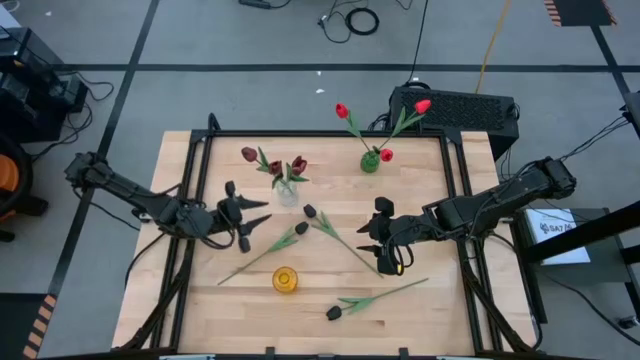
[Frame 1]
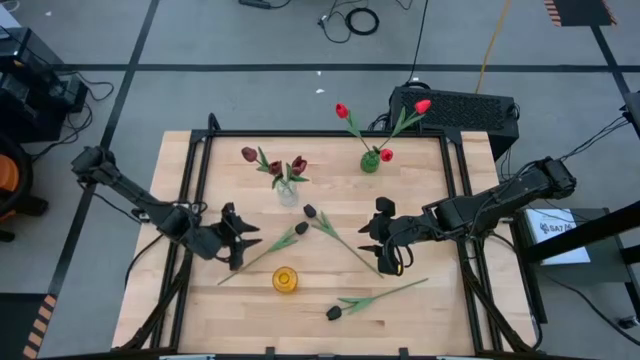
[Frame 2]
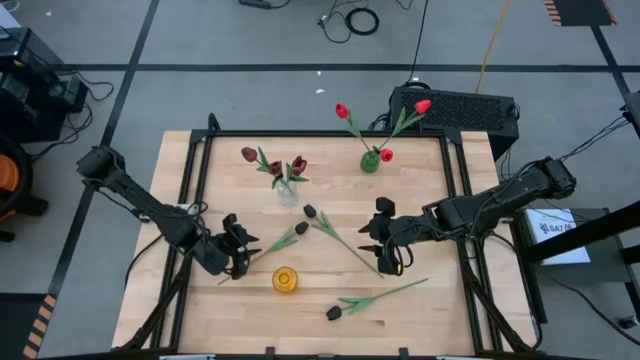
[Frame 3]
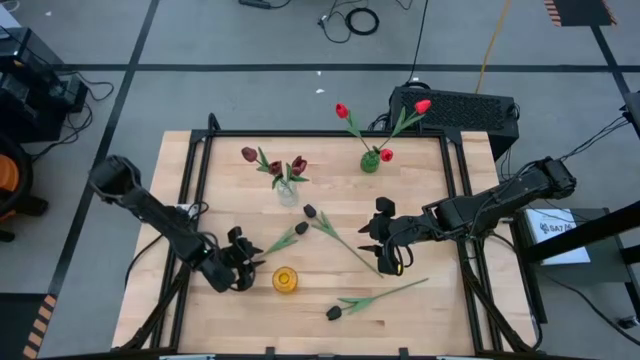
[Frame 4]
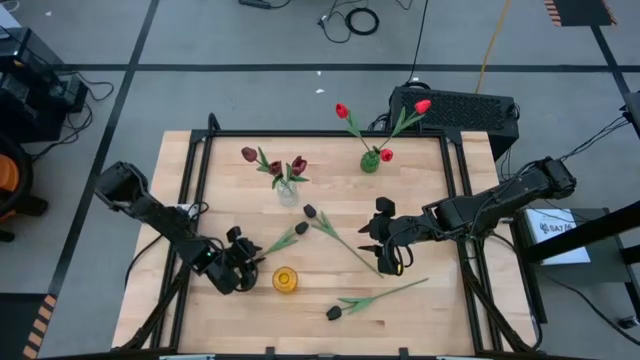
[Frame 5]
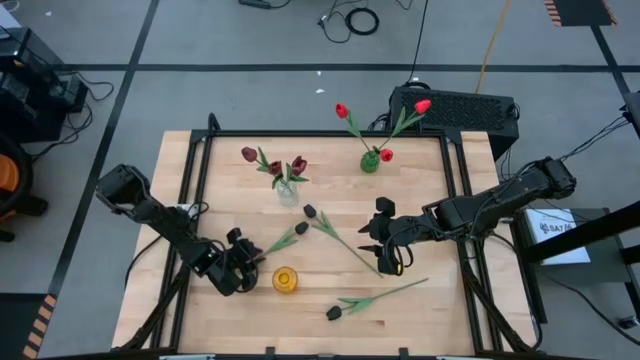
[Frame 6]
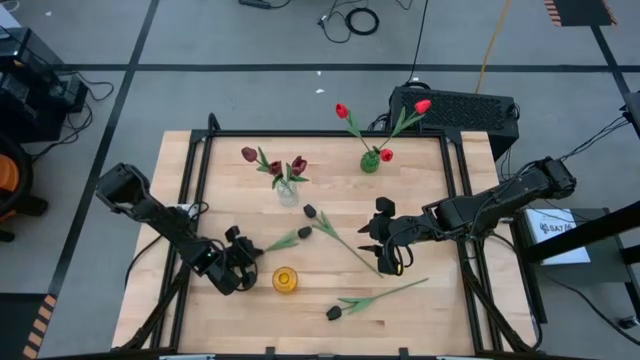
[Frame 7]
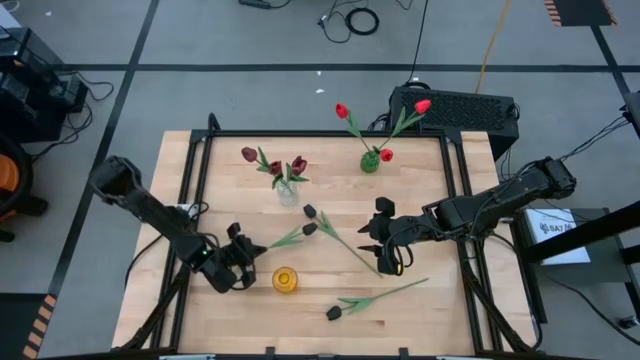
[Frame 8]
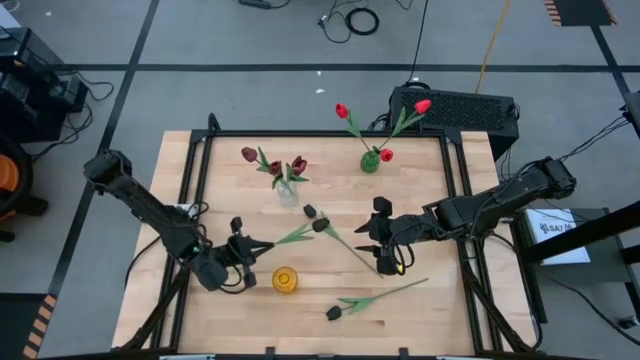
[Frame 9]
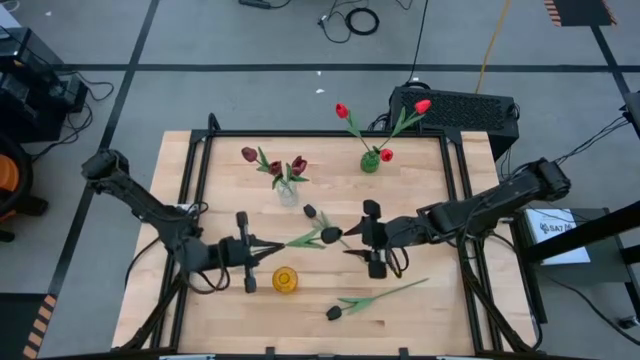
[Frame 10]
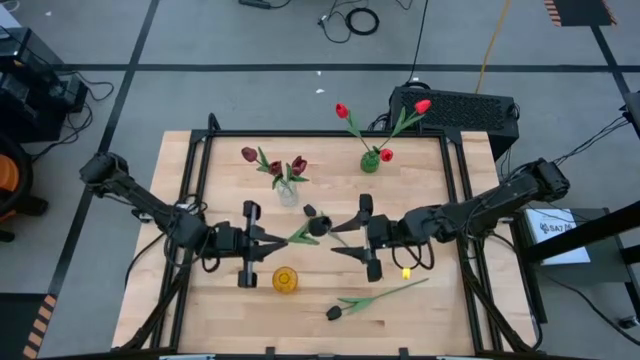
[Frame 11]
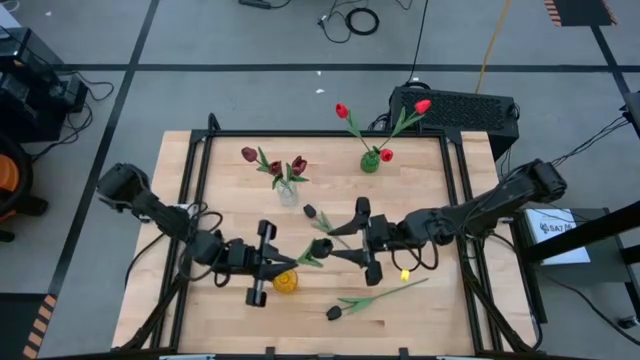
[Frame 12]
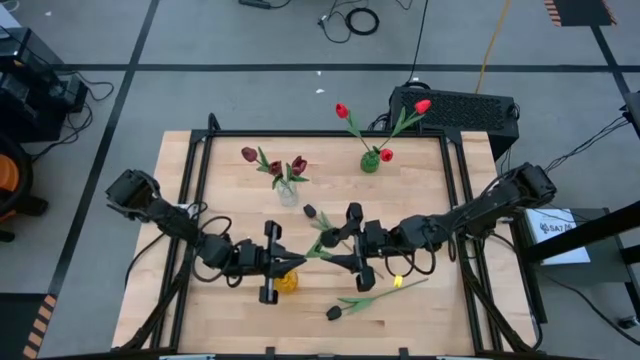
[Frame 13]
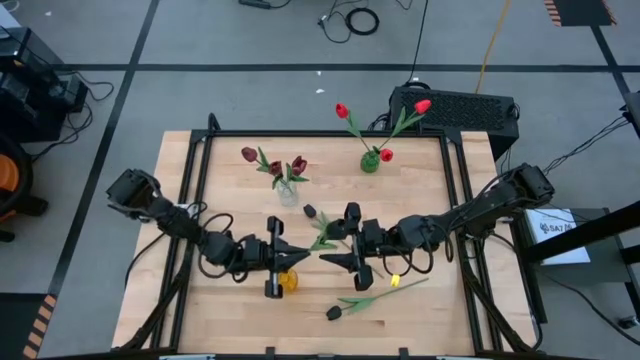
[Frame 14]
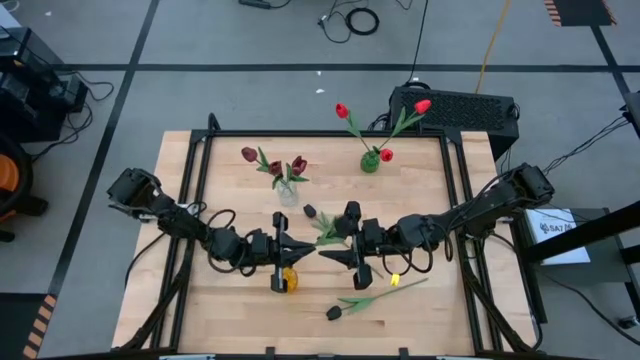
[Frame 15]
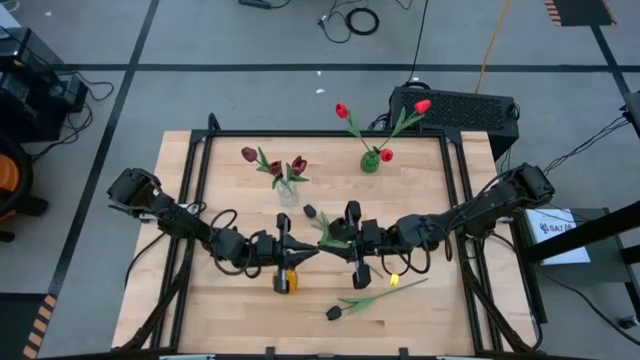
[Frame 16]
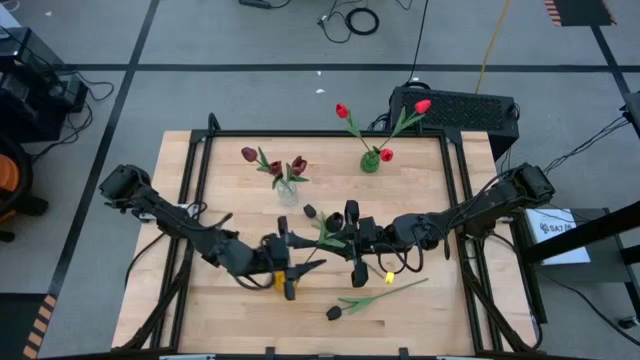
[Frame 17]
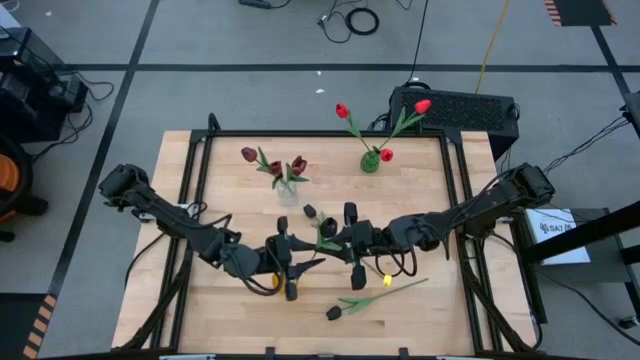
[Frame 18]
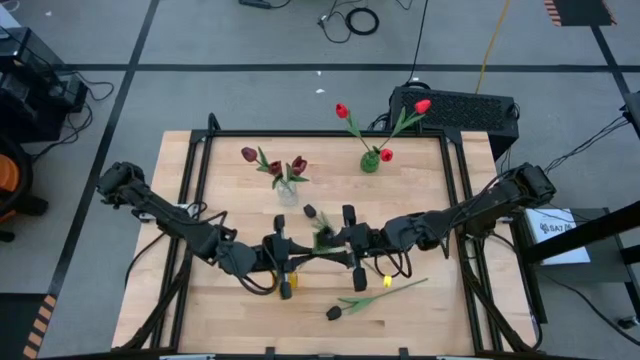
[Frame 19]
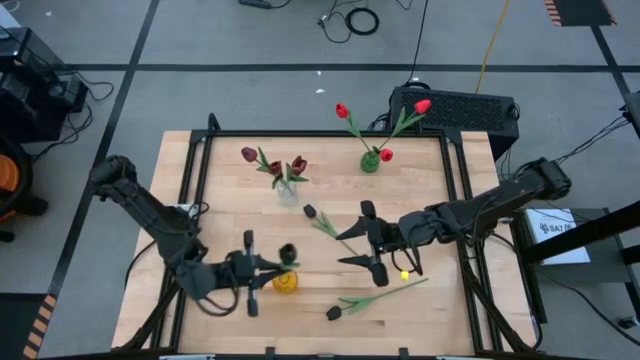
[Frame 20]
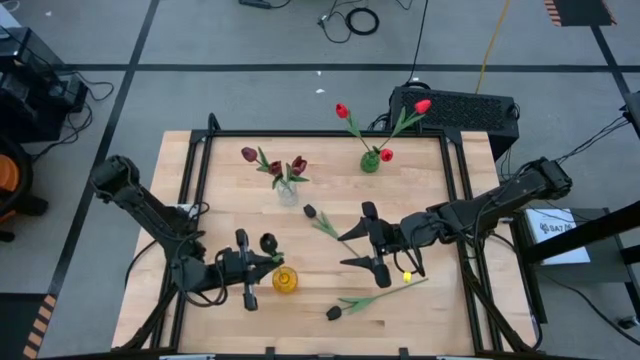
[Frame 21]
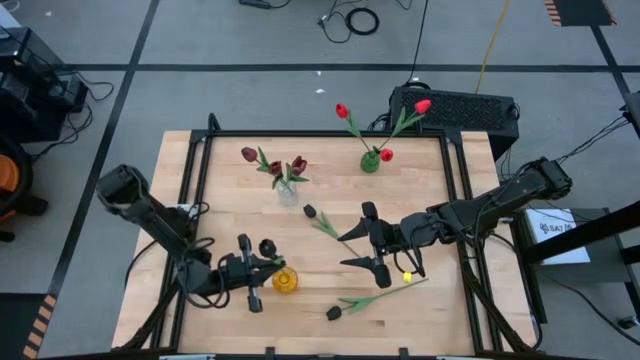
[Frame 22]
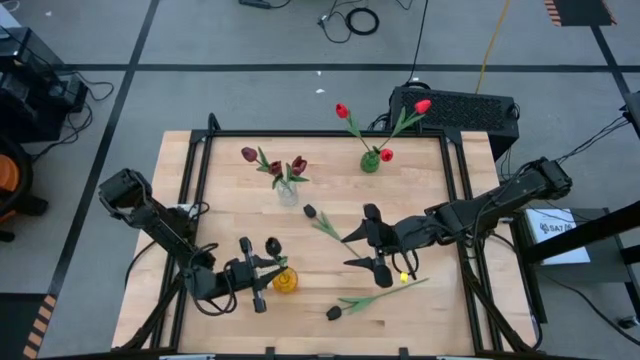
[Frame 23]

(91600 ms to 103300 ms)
Task: Sort flowers into vase by color
Put the top left black tulip into the yellow vase

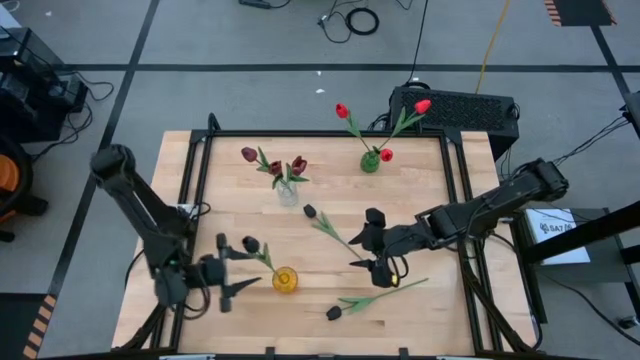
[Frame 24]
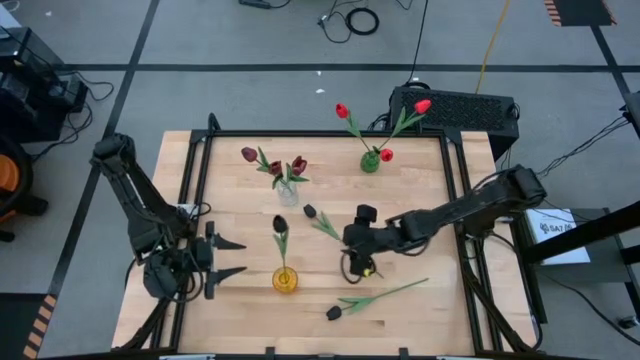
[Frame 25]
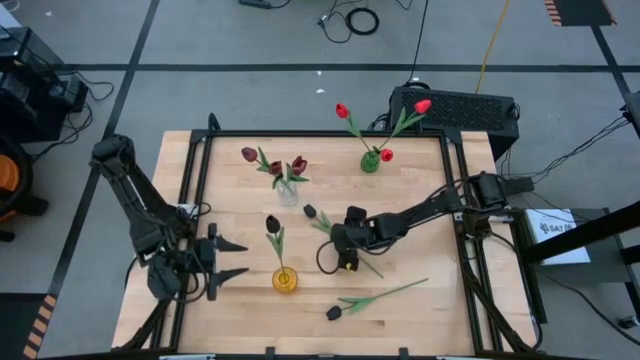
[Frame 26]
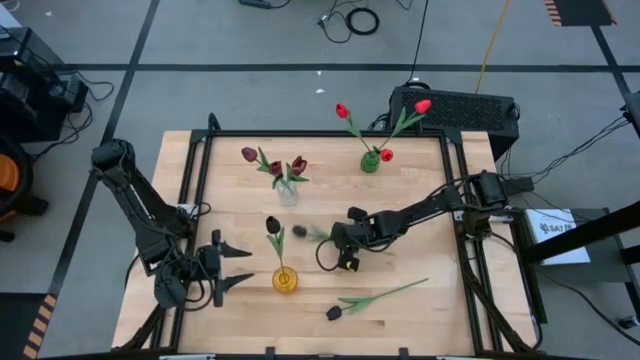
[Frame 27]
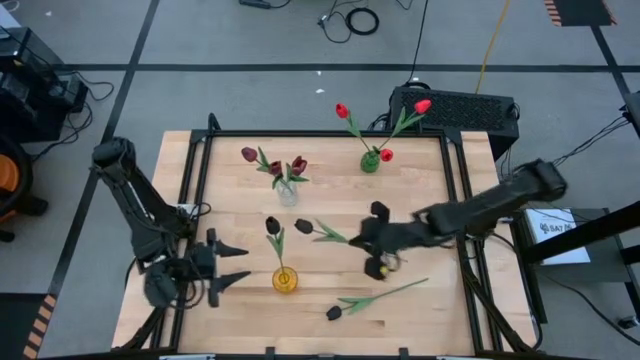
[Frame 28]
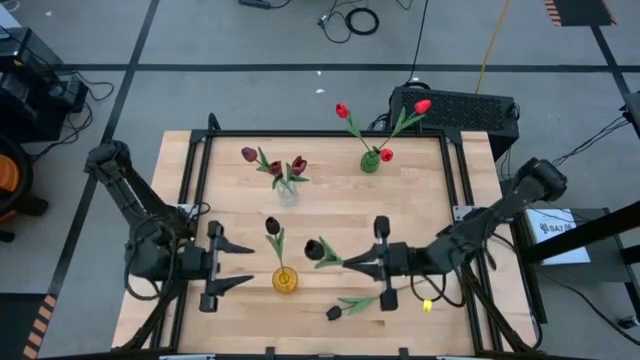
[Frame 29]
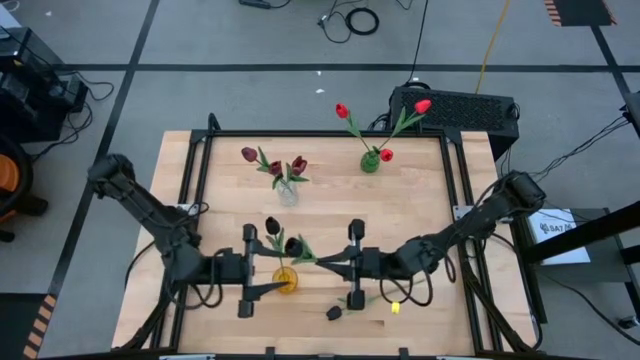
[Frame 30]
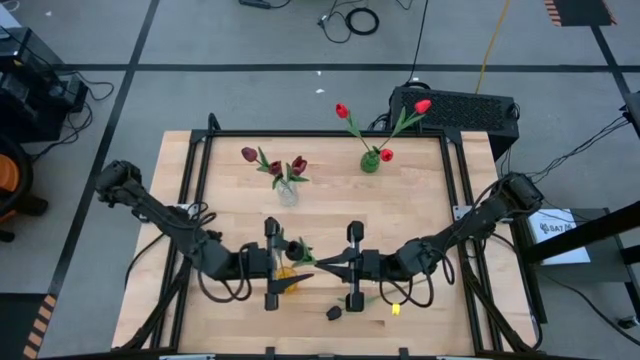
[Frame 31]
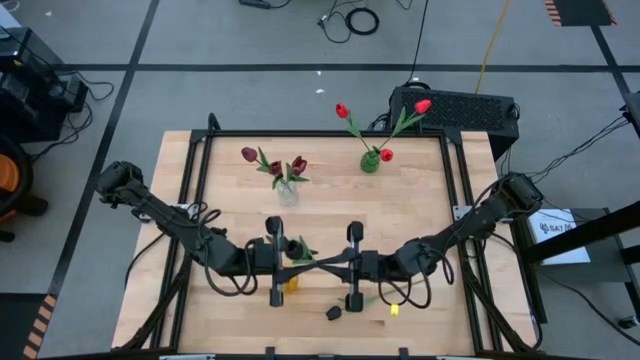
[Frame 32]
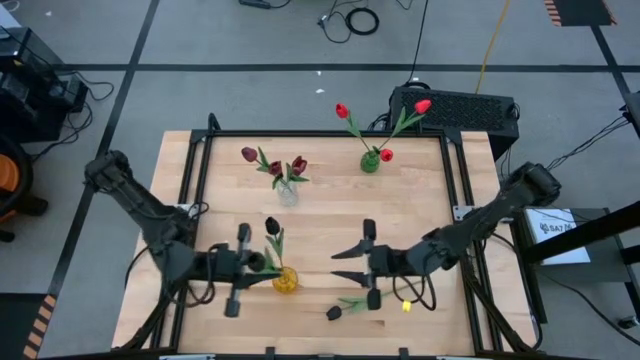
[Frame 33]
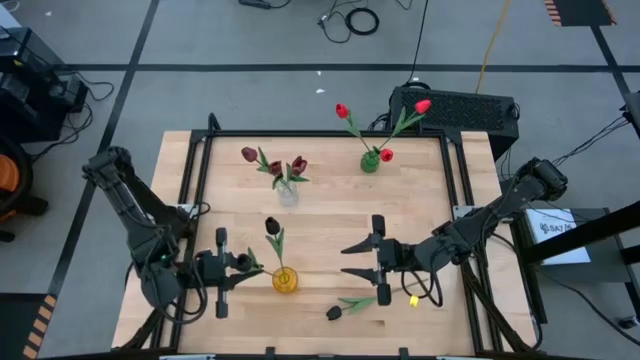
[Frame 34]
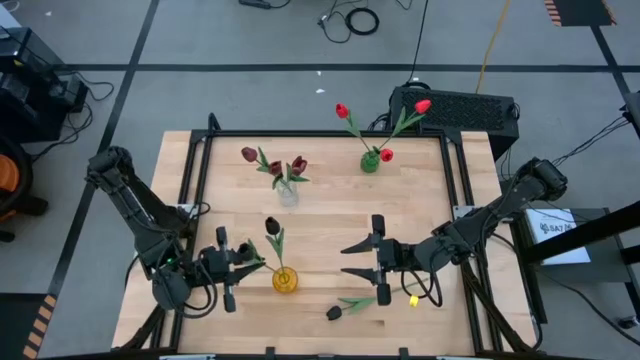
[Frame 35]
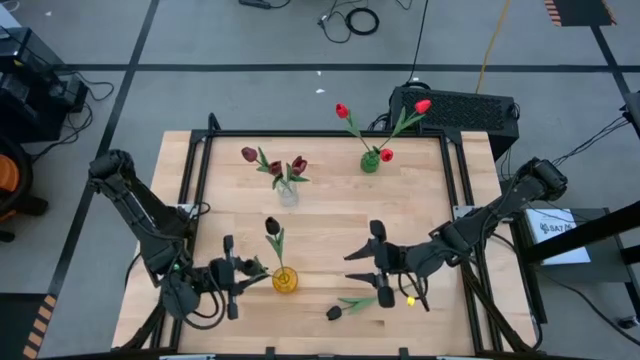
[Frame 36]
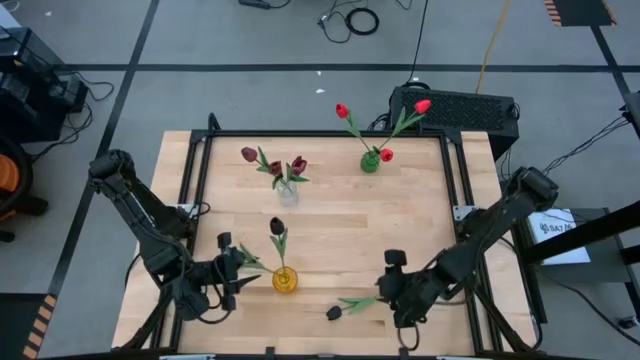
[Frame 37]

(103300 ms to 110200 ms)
Put the top black tulip into the yellow vase

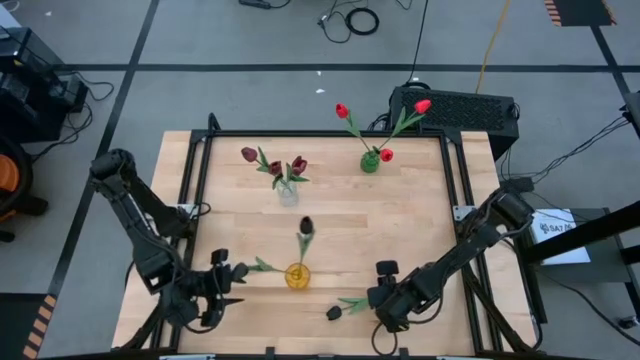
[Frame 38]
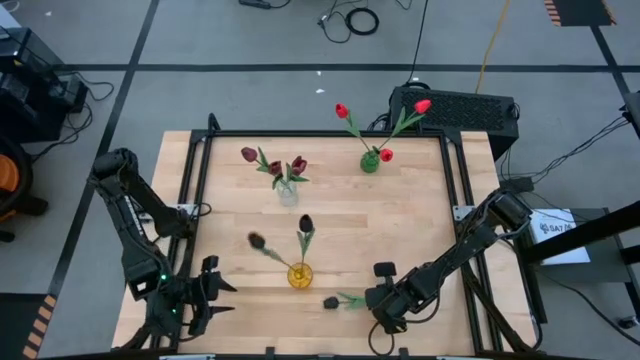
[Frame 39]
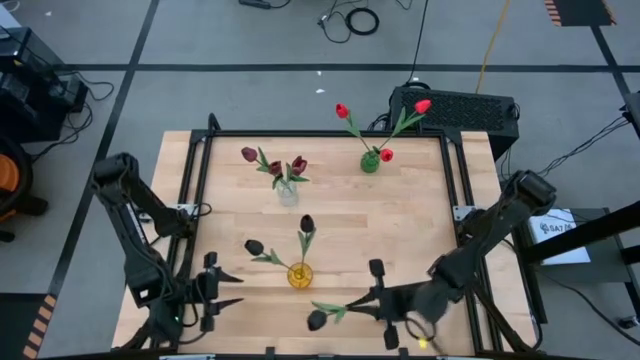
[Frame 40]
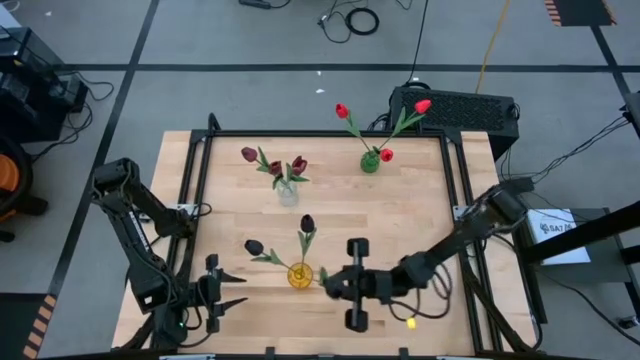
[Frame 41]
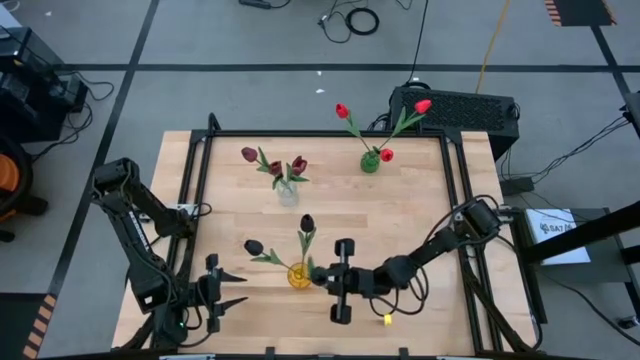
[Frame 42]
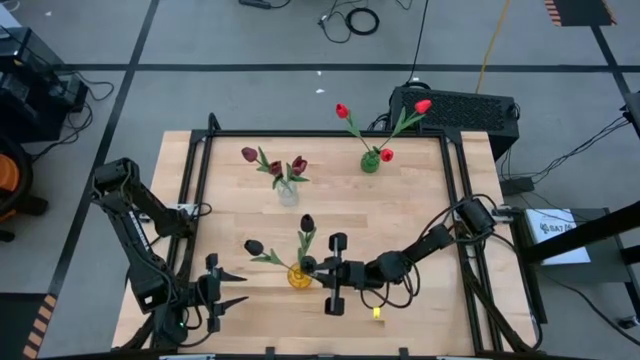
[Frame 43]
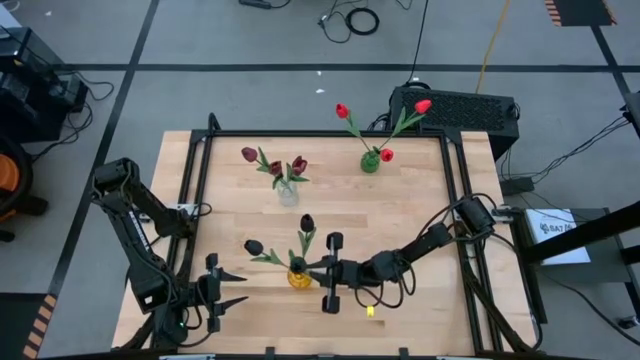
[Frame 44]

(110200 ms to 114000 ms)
Put the black tulip into the yellow vase

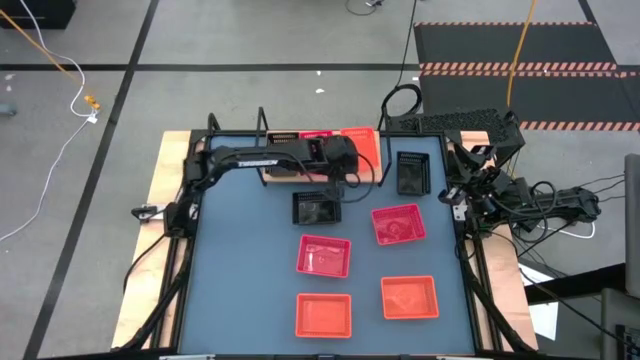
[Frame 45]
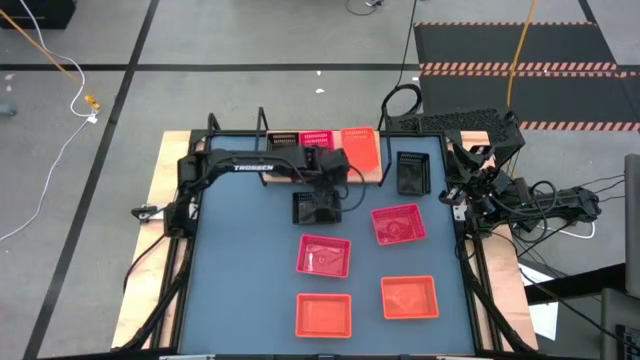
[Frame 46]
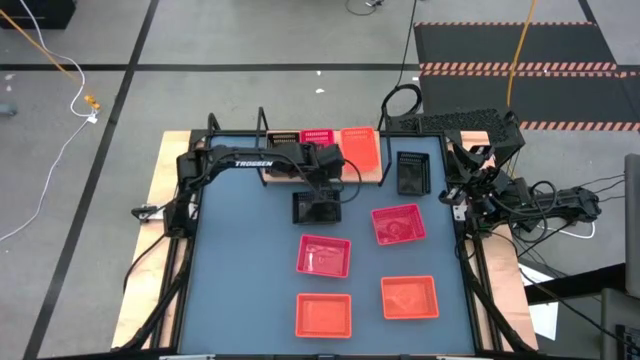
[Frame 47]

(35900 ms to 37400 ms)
Task: Stack baskets on shelf by color
Adjust the red bin on the shelf
